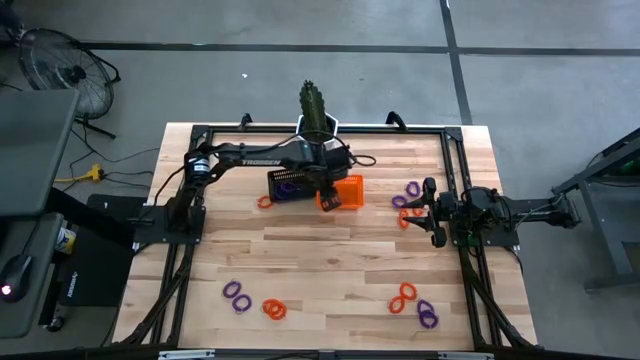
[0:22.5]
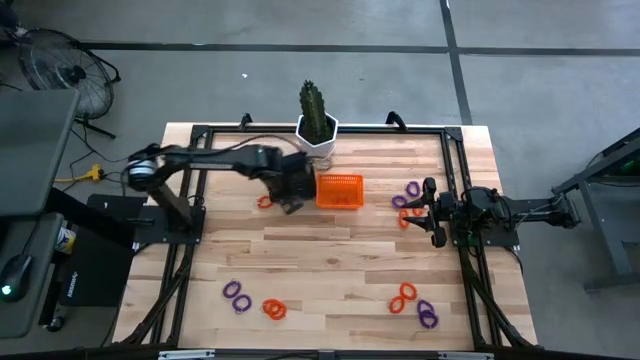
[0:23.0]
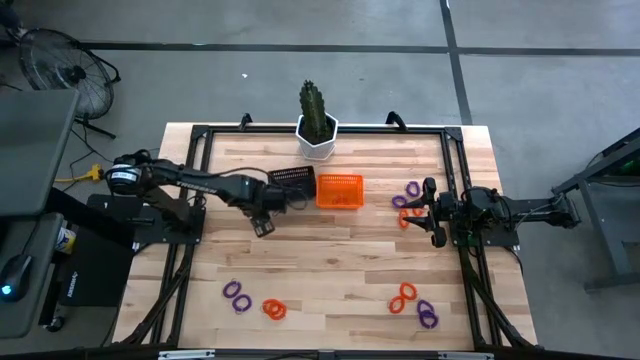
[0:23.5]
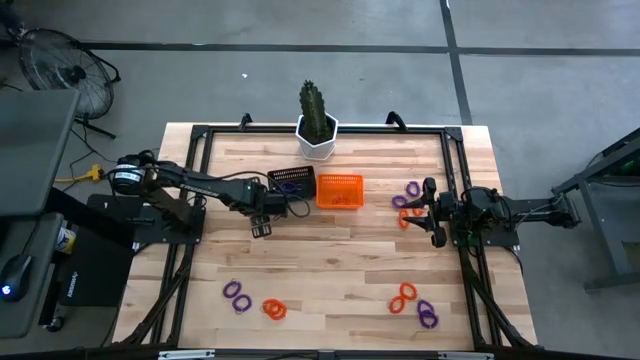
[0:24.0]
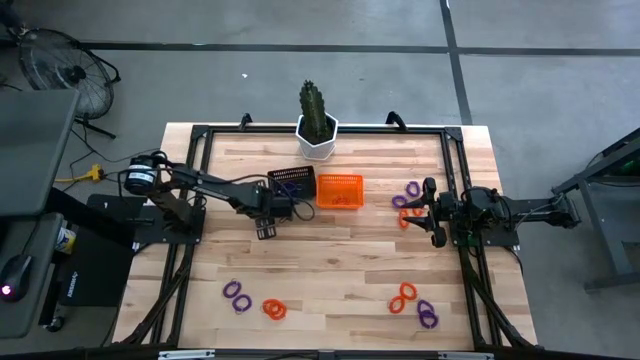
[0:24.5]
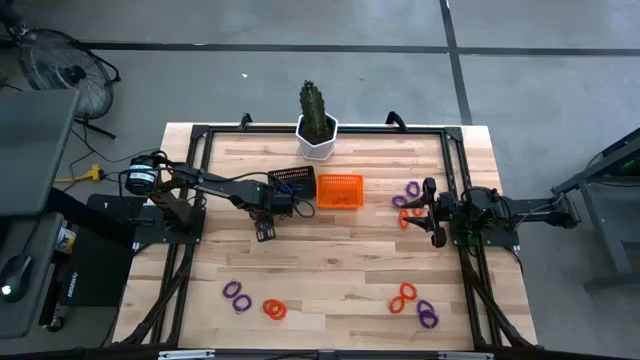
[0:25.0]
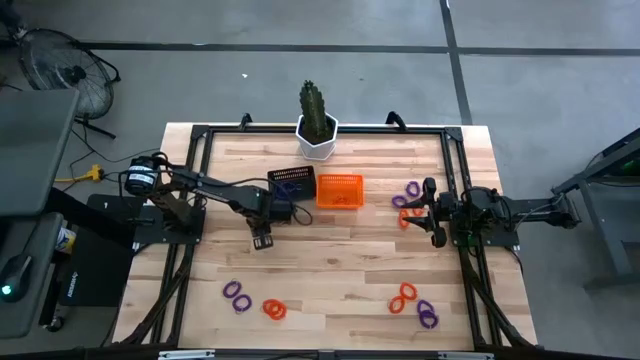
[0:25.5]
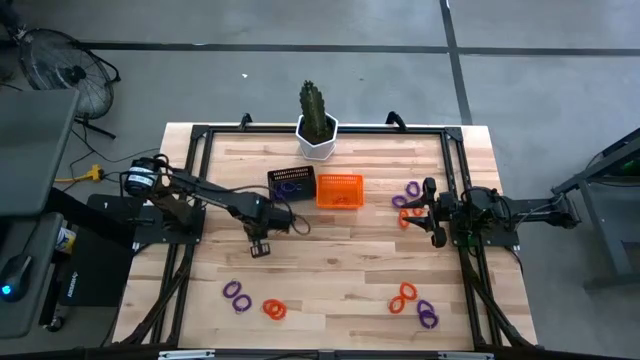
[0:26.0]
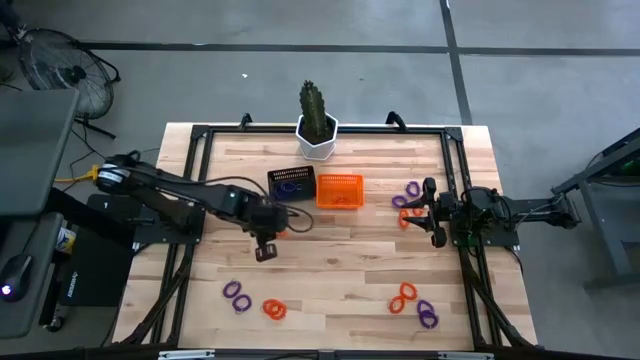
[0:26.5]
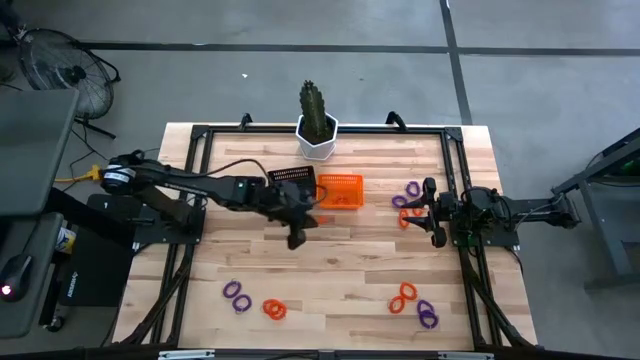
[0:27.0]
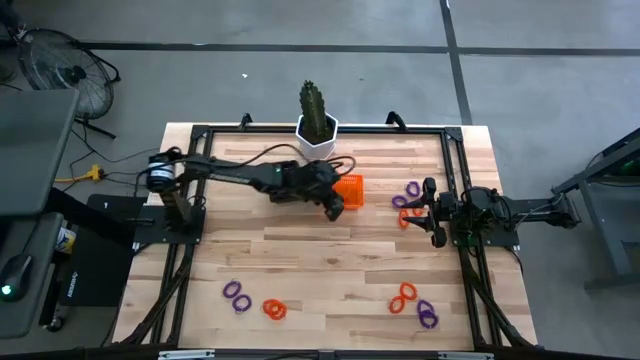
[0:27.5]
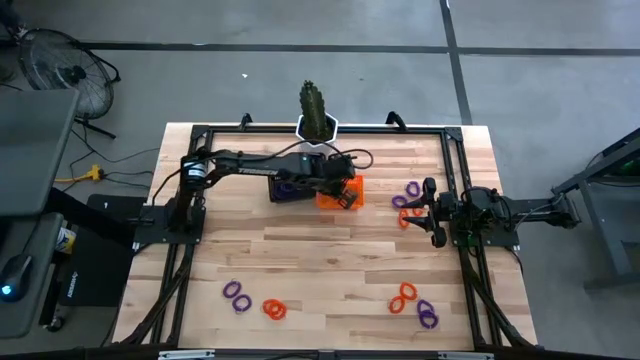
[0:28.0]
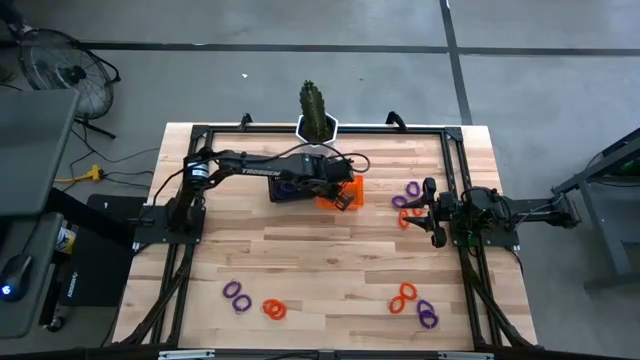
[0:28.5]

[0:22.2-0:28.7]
Task: Sort spring keychains
Put the orange spring keychain in the orange bin

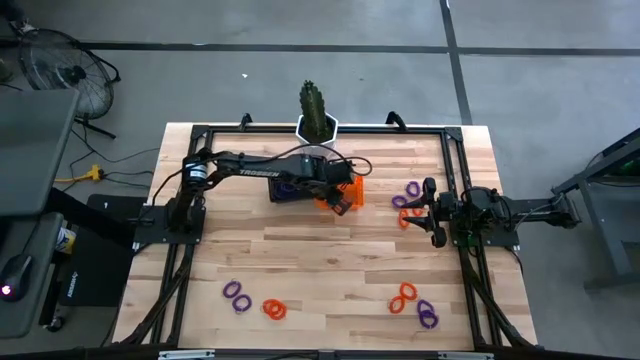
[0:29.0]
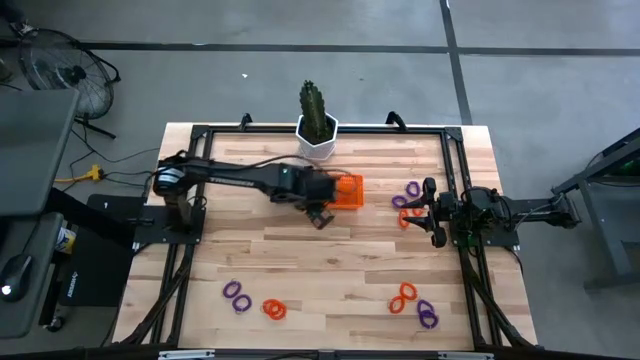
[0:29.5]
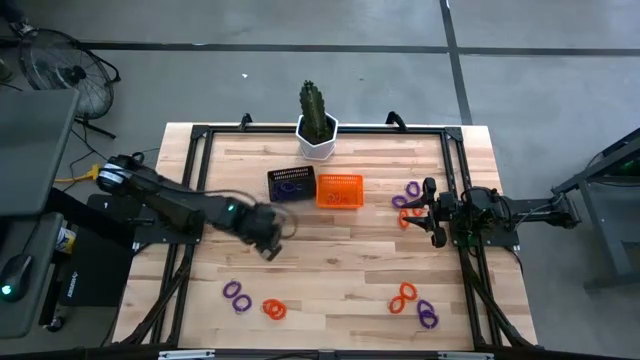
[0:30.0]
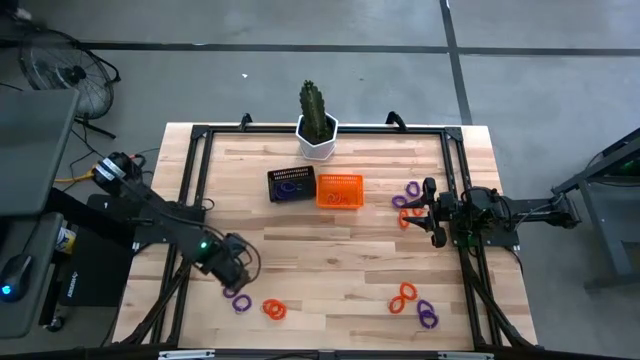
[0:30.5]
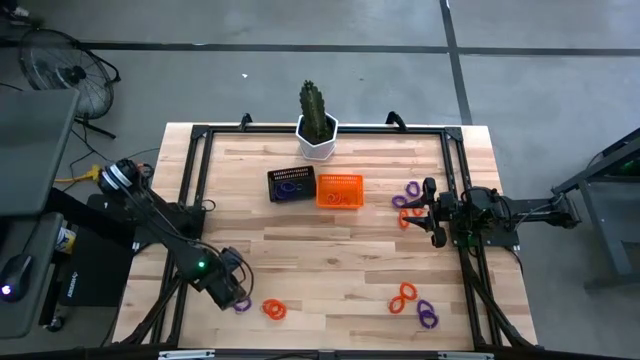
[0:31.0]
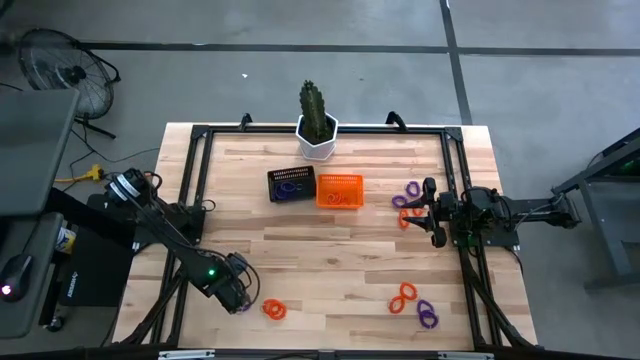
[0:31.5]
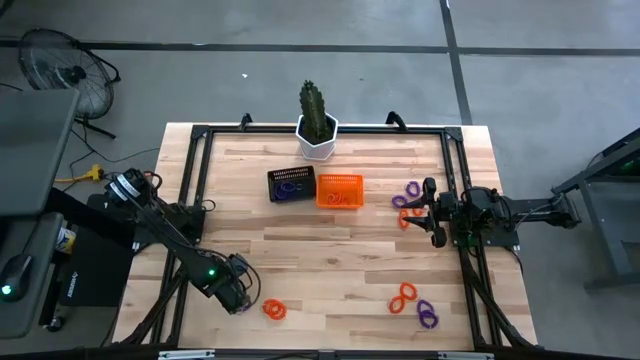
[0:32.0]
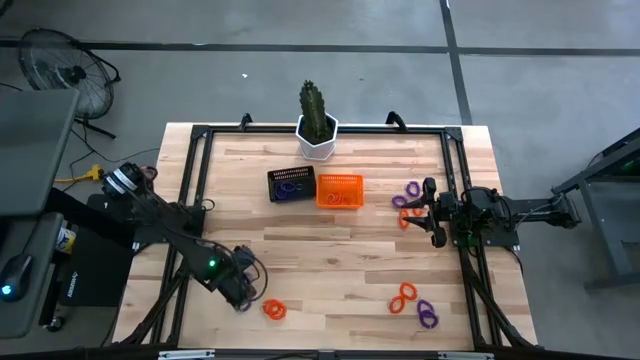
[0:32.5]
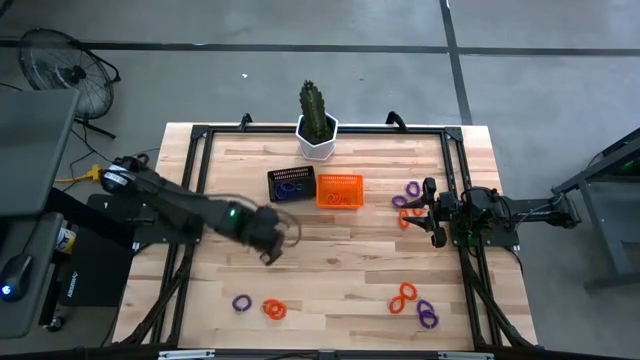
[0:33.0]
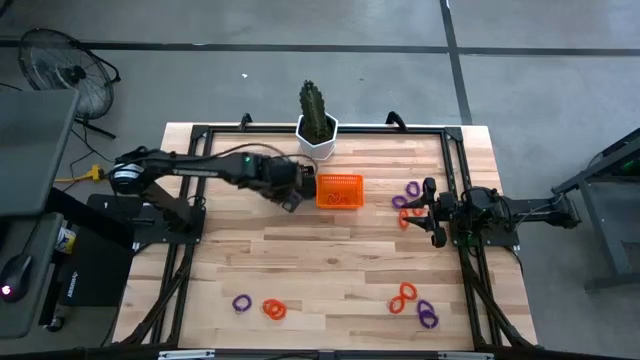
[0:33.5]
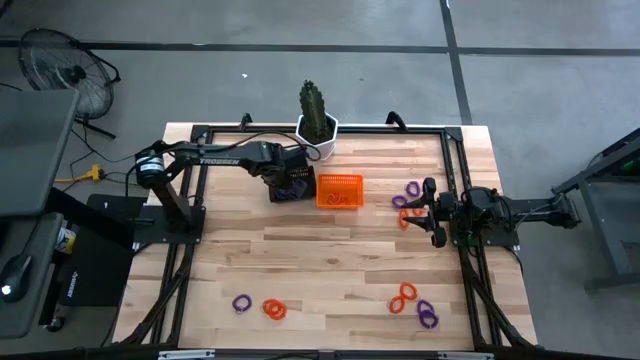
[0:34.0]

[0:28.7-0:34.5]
Put the purple spring keychain in the black bin

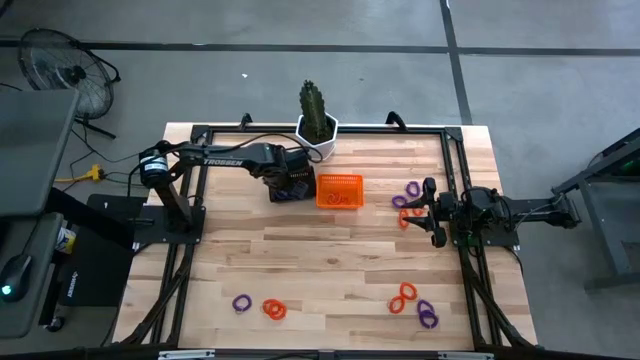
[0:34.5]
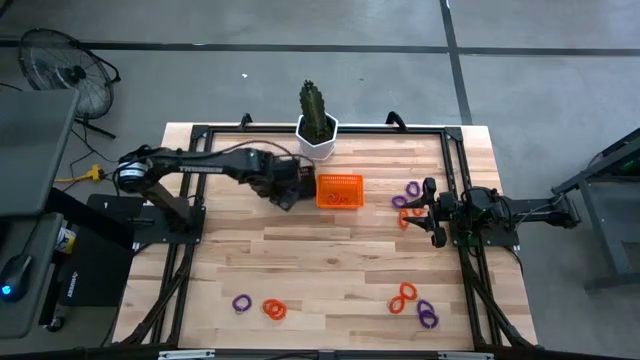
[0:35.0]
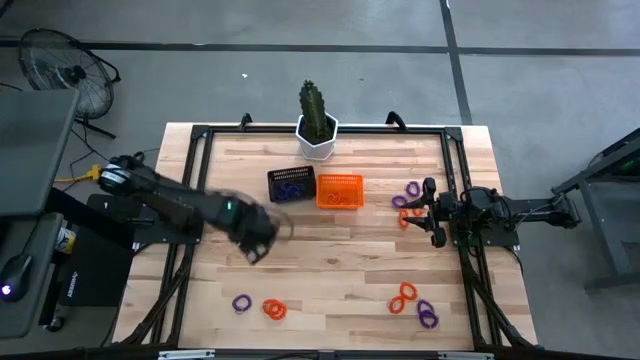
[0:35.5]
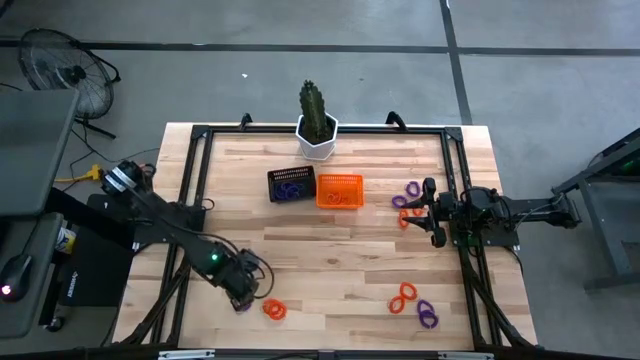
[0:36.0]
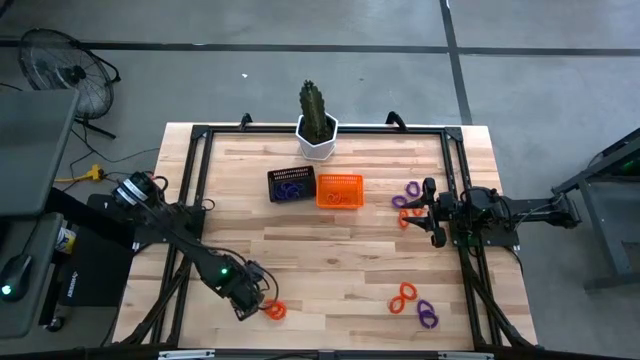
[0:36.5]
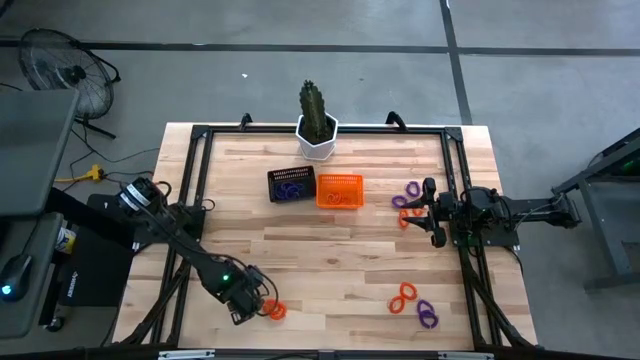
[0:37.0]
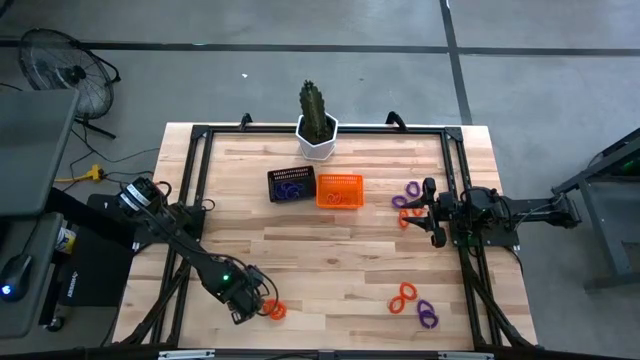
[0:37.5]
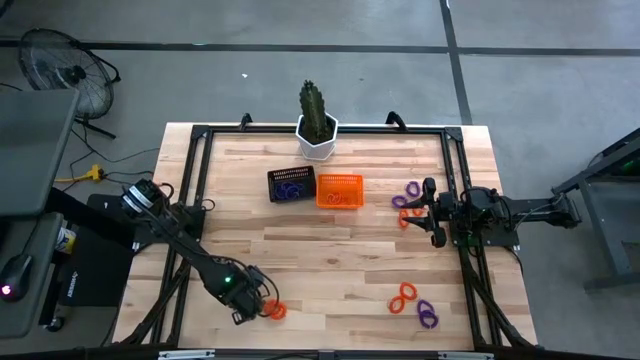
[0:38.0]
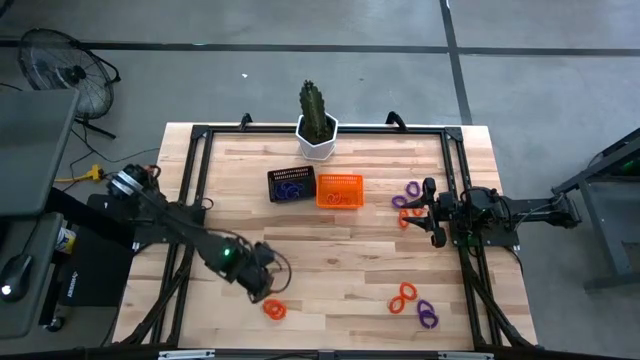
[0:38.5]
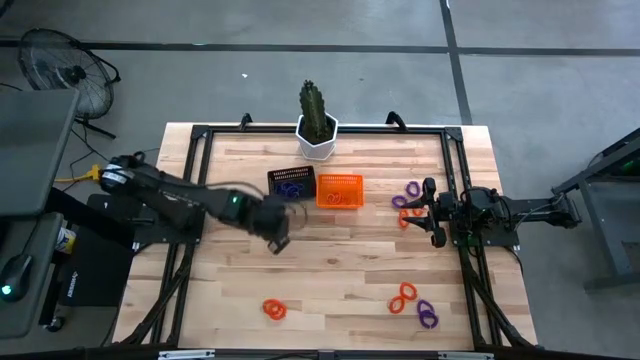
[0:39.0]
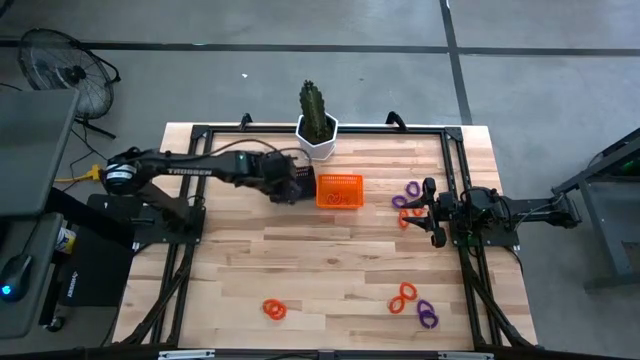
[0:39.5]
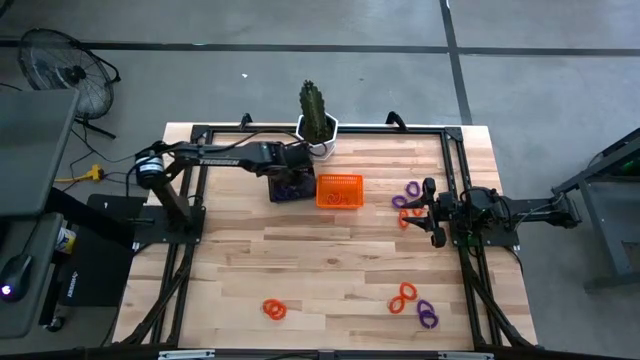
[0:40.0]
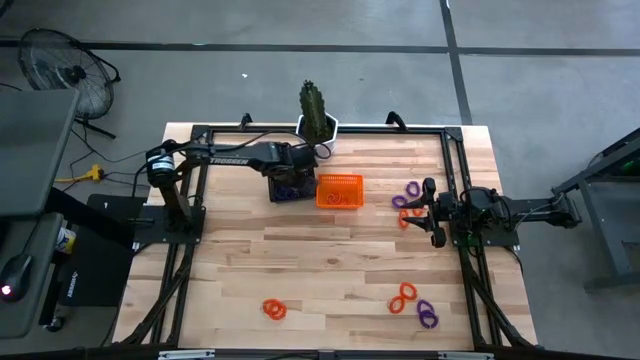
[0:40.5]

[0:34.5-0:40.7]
Put the purple spring keychain in the black bin

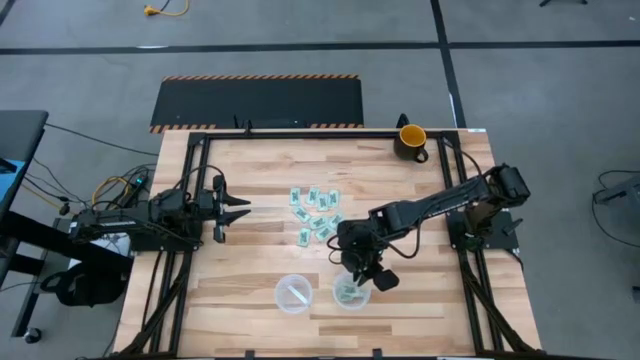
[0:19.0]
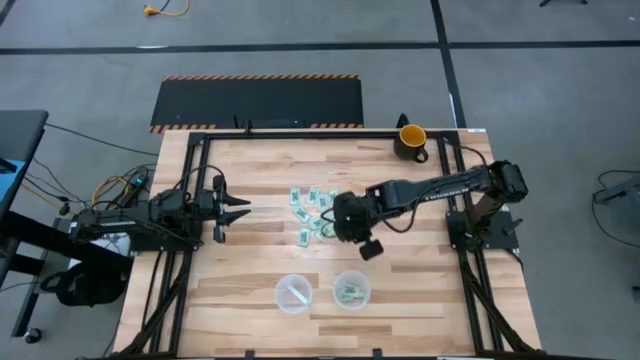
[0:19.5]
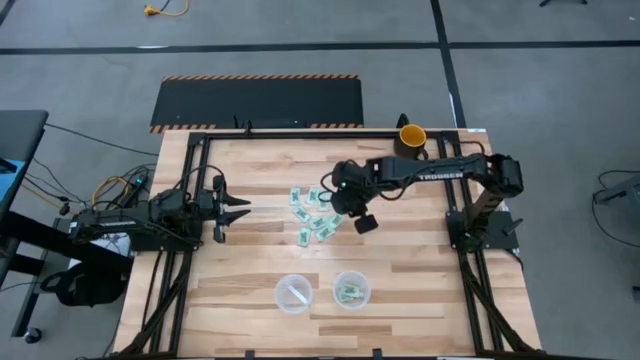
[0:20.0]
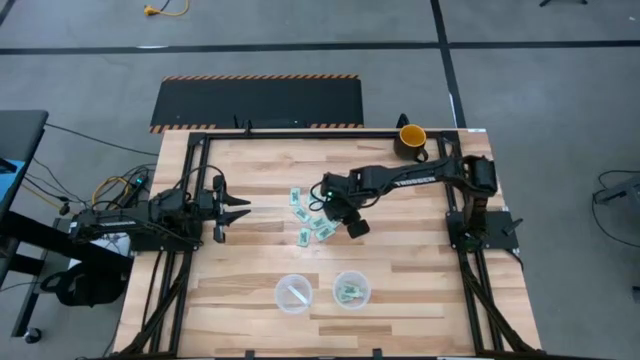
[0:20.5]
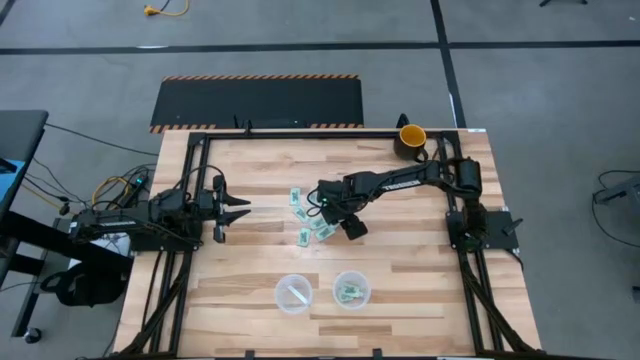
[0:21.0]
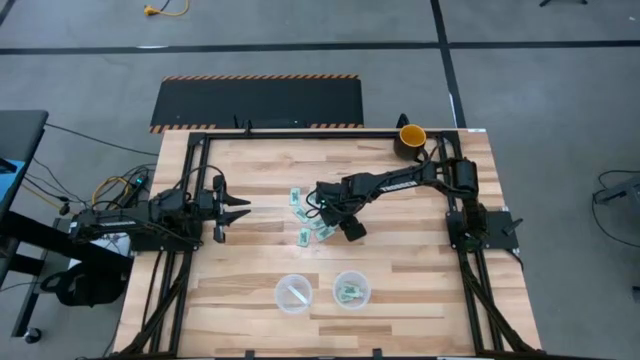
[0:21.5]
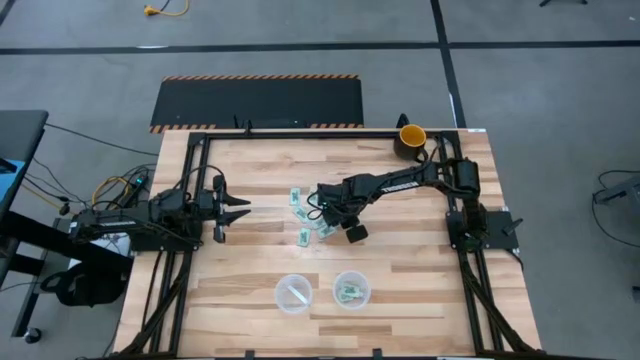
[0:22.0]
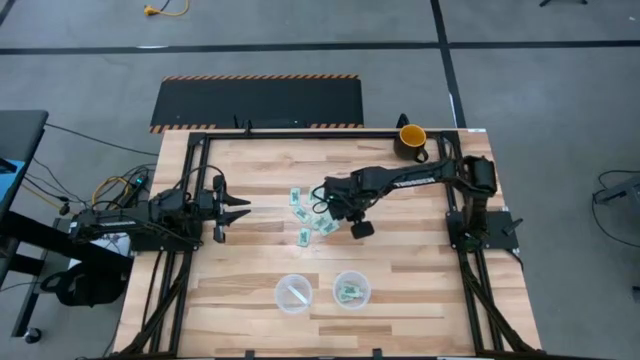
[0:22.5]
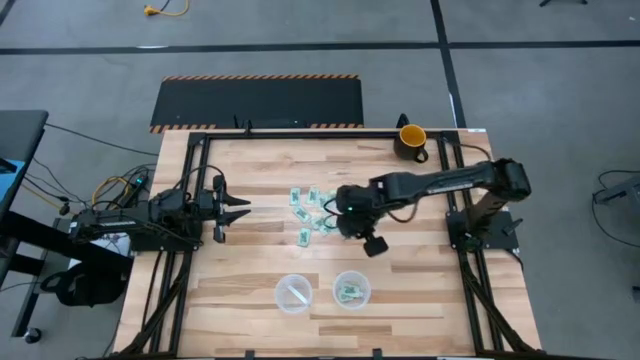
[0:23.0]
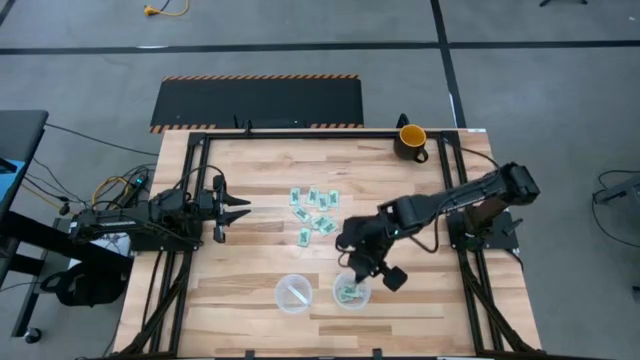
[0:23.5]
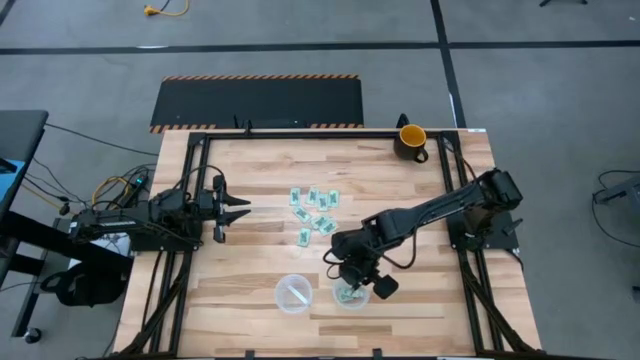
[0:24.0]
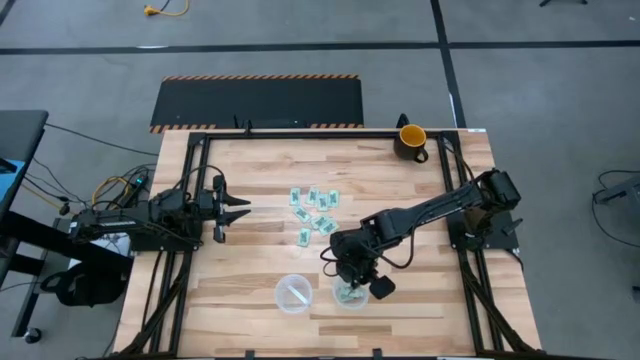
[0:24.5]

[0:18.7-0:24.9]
Task: Pick and place Stevia / Truvia into bins
Put the white stevia pack into the right transparent basket
